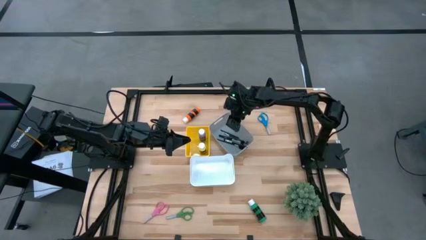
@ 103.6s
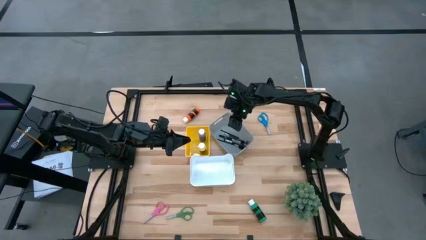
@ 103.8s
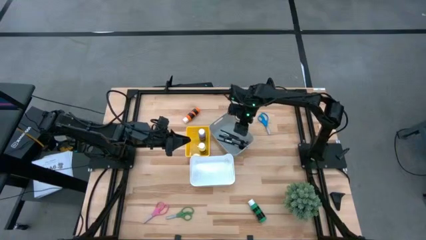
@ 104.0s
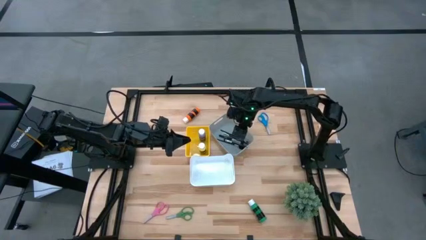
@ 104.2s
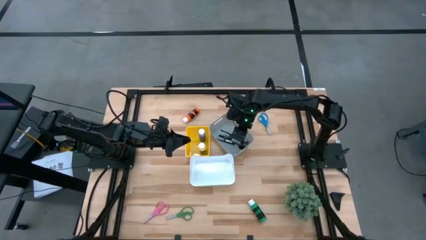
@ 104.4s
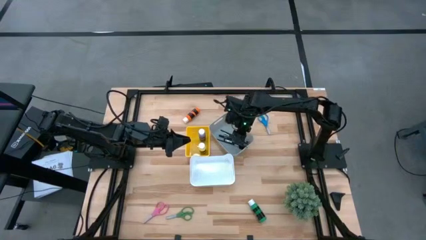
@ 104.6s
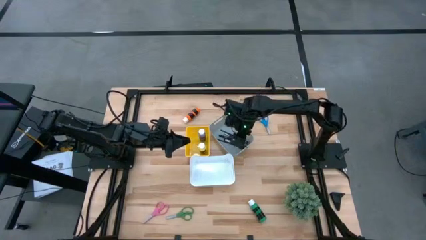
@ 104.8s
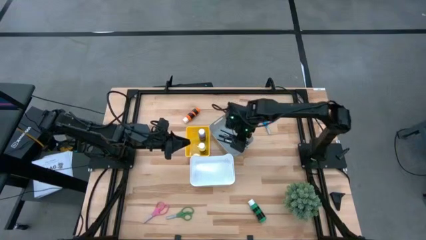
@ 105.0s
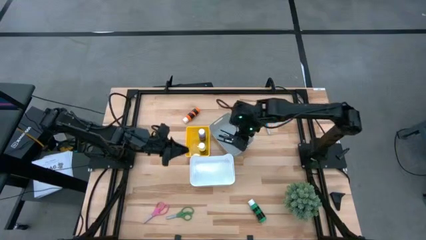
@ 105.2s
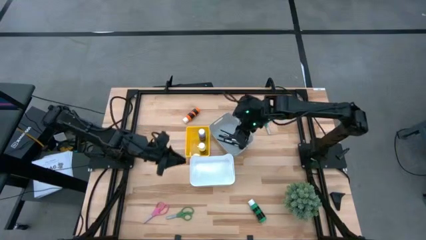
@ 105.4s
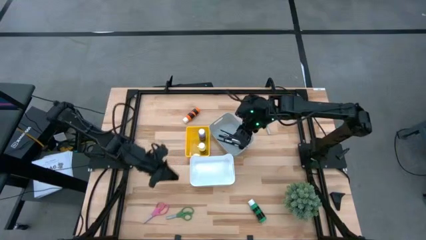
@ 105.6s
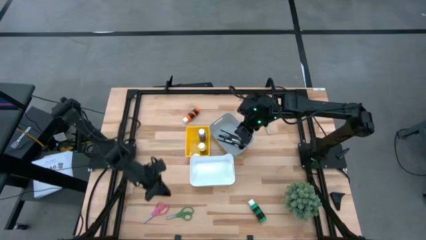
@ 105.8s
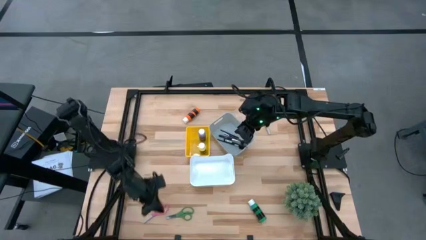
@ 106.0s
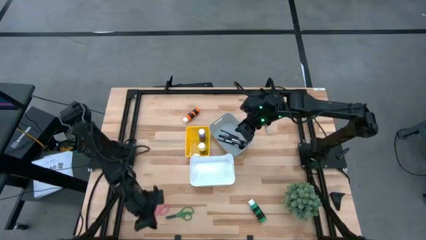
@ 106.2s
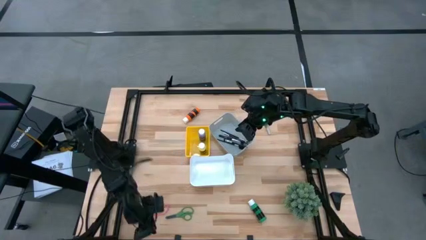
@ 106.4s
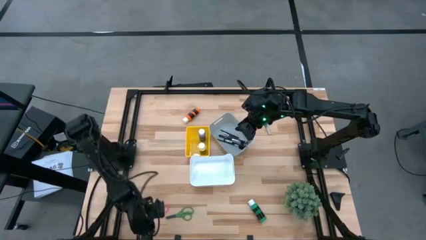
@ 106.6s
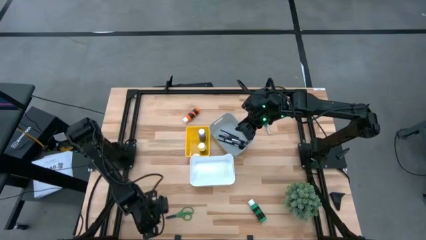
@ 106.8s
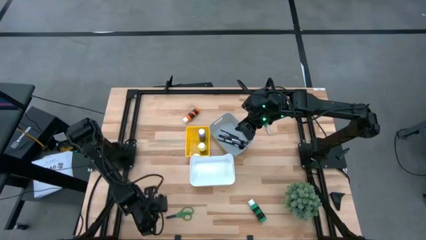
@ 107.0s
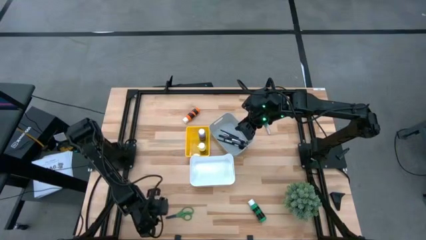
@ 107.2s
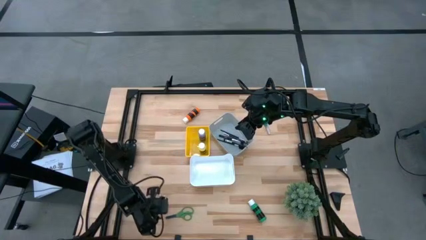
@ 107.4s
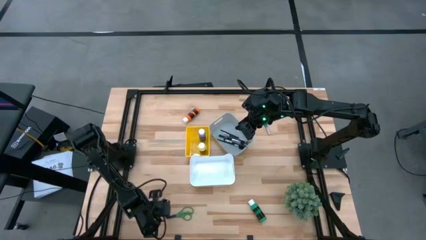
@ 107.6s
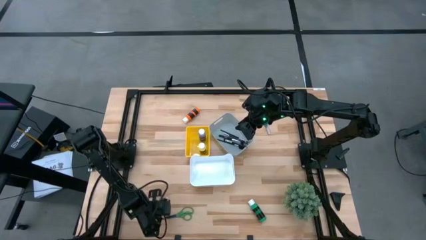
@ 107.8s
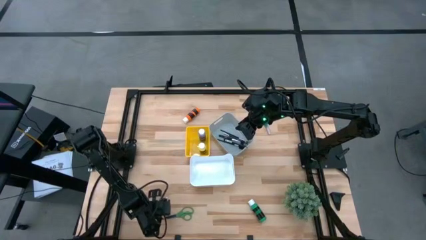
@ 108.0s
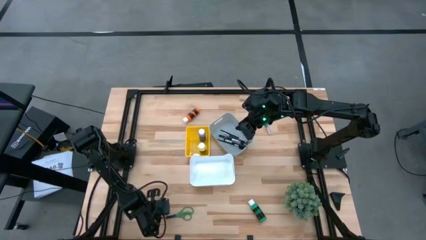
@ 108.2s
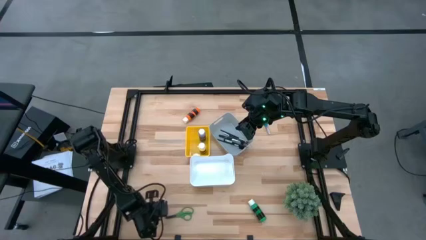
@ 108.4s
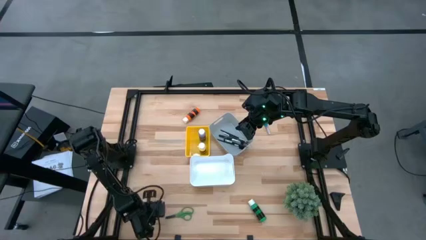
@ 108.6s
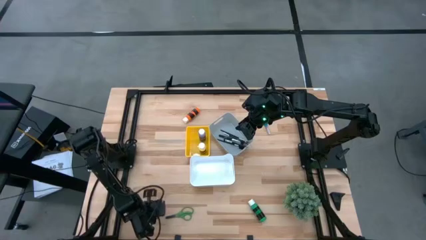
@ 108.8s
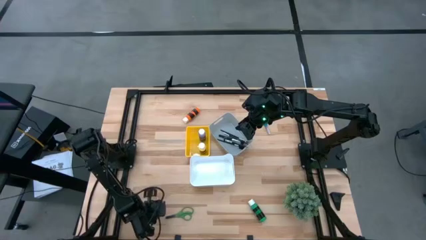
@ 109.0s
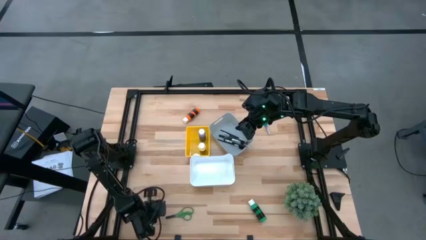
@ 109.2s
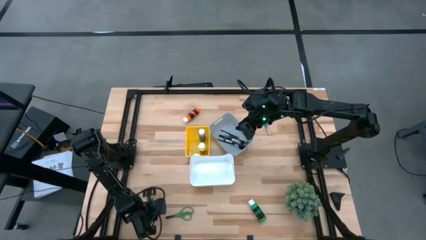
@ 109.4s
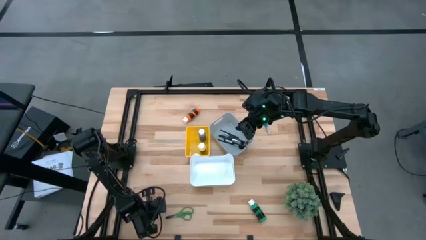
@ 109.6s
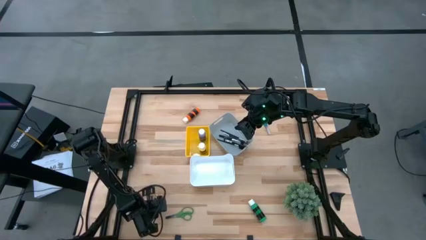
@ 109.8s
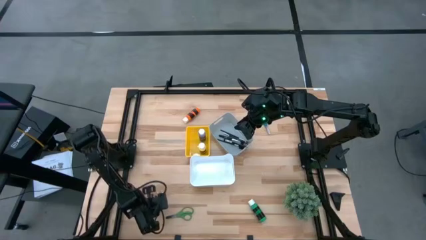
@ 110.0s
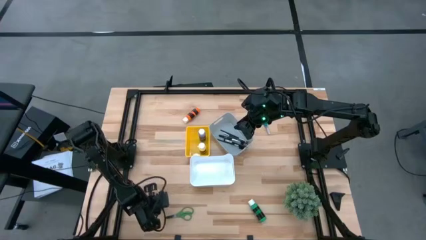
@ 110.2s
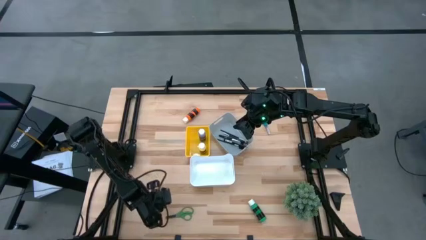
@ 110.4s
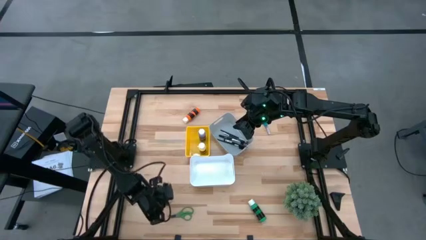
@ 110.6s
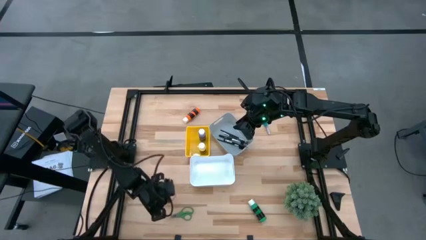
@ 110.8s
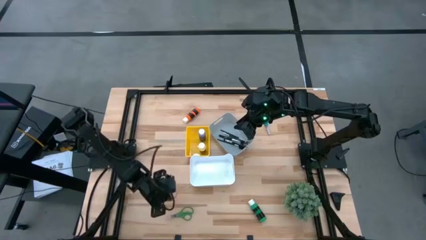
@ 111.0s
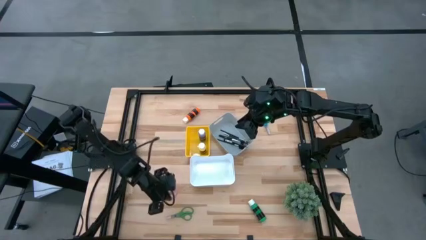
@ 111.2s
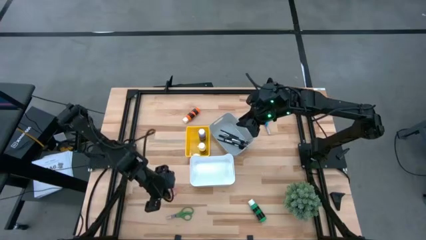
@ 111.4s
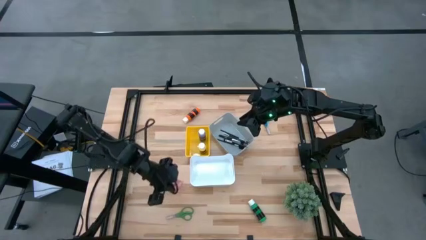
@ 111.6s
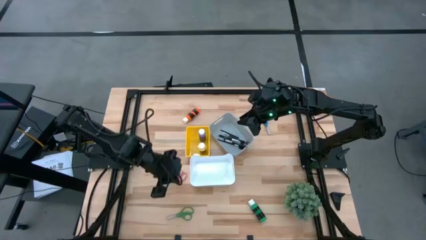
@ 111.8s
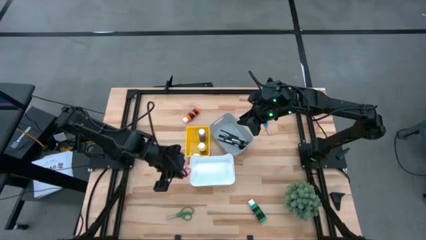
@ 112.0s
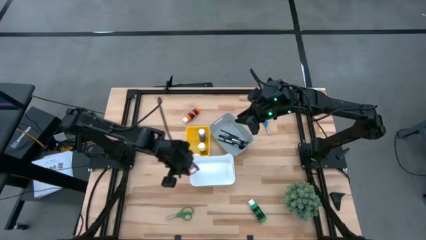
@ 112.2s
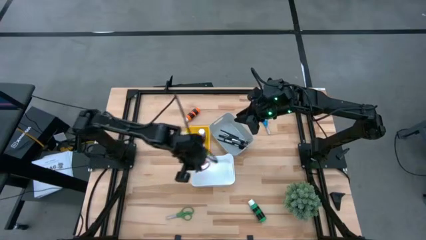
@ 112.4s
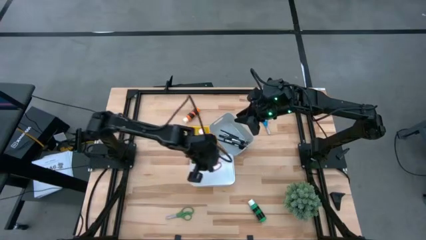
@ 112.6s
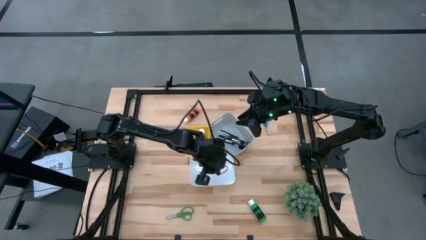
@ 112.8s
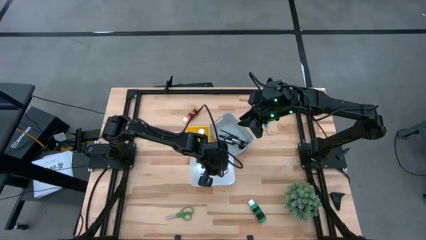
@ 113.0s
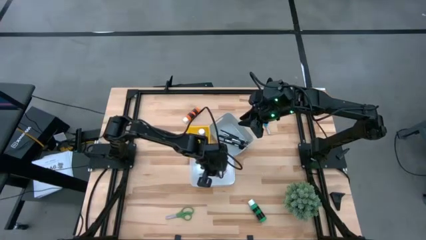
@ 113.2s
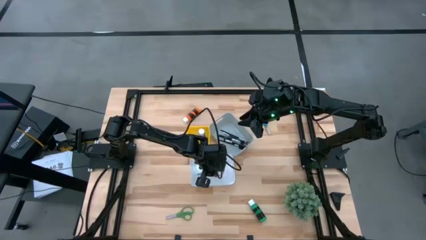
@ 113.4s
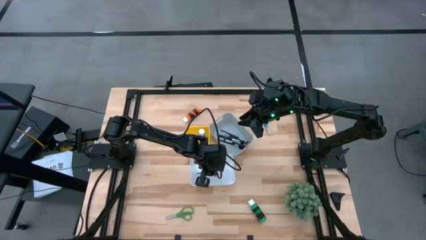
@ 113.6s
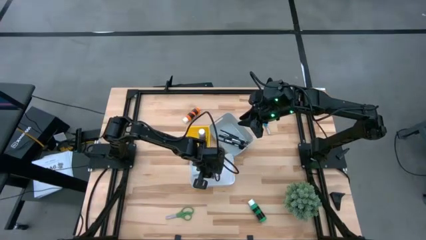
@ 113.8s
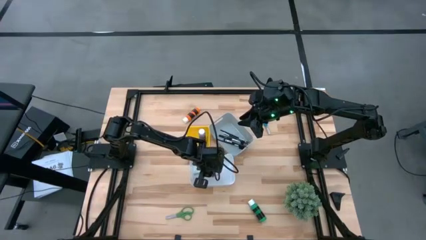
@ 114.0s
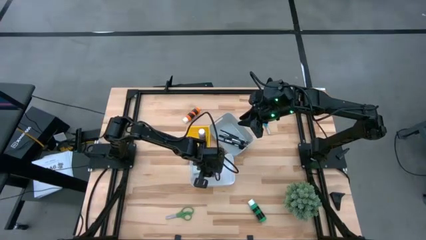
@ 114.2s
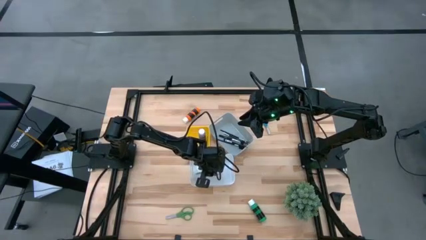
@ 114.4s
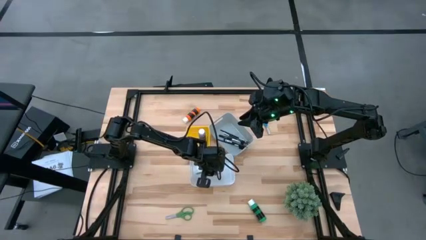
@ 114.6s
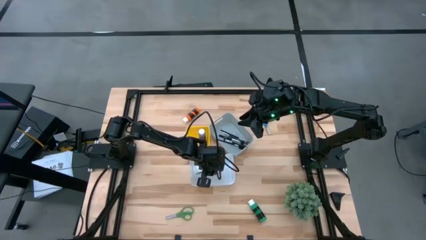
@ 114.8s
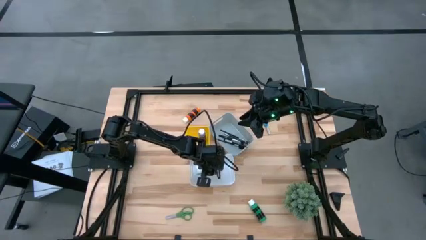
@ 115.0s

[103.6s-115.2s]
Task: Pick & Place Paint Supplies
Put the pink scissors into the white bin

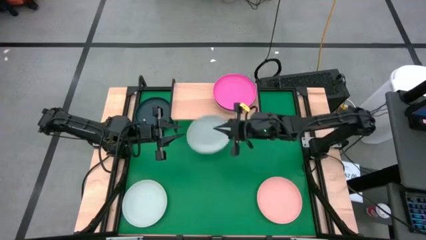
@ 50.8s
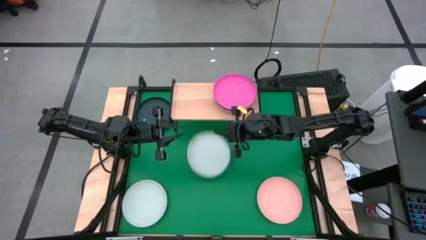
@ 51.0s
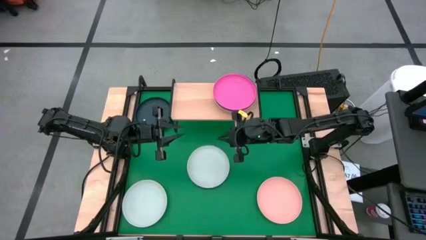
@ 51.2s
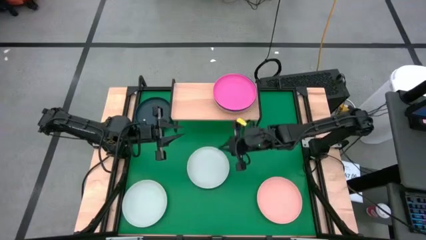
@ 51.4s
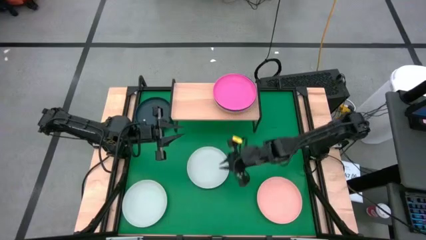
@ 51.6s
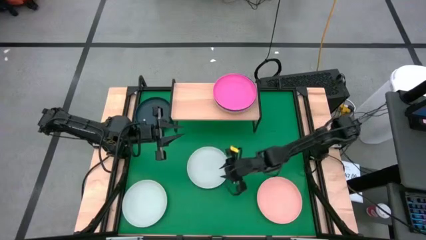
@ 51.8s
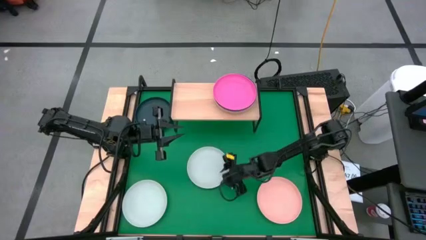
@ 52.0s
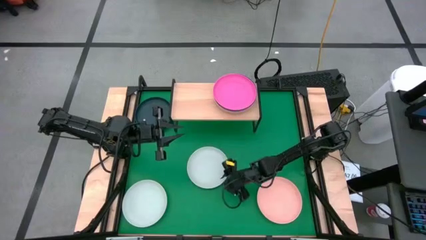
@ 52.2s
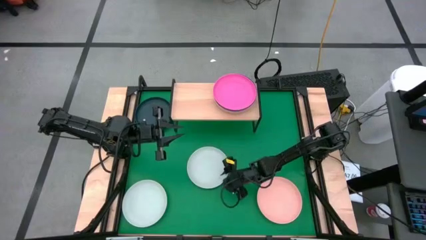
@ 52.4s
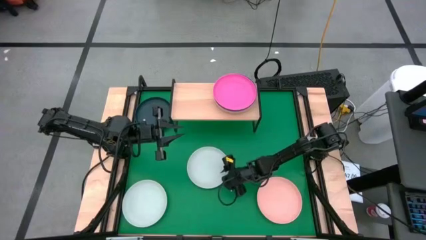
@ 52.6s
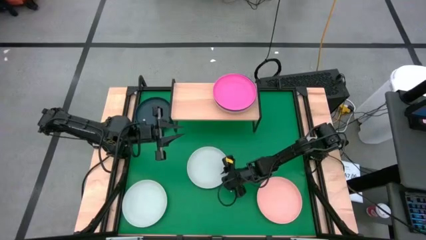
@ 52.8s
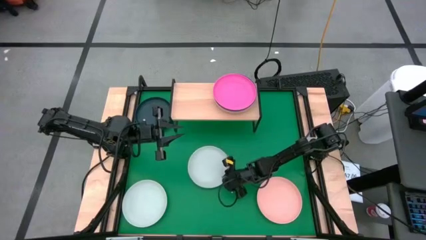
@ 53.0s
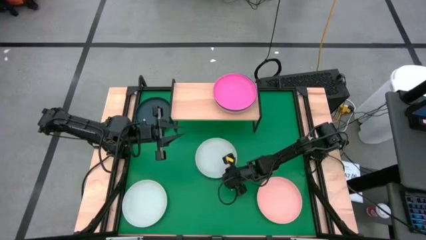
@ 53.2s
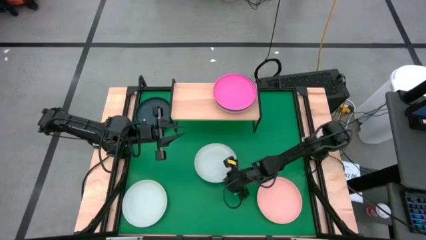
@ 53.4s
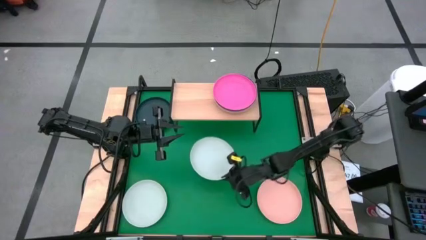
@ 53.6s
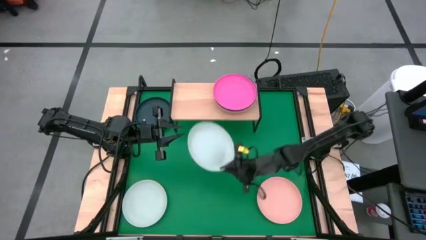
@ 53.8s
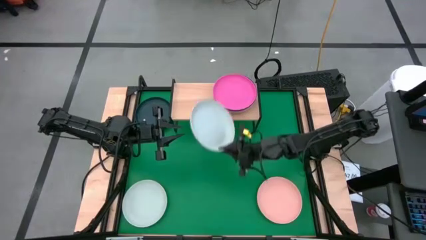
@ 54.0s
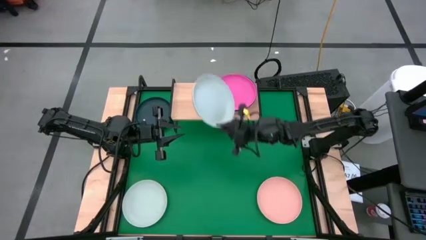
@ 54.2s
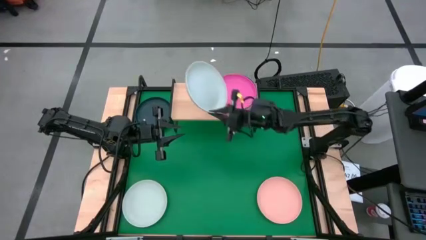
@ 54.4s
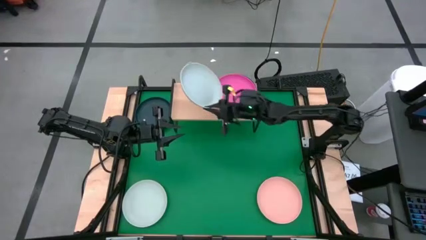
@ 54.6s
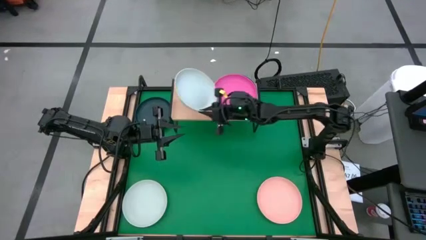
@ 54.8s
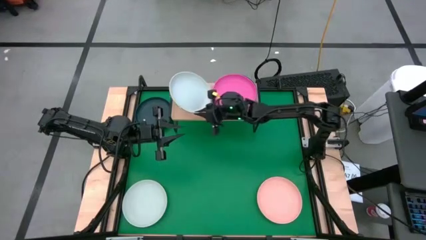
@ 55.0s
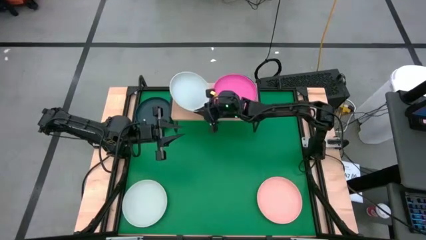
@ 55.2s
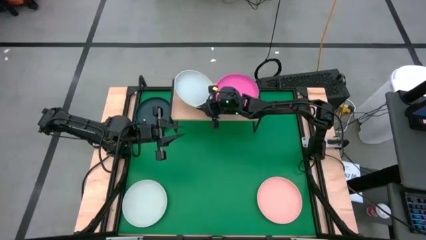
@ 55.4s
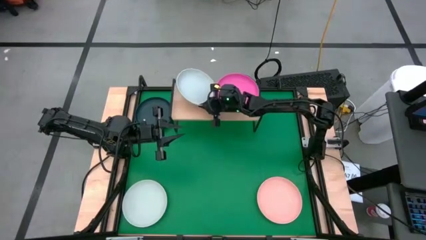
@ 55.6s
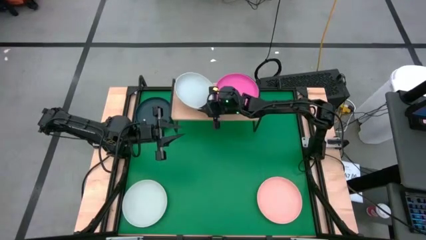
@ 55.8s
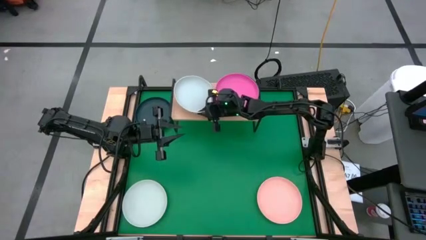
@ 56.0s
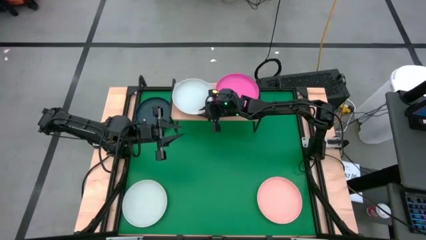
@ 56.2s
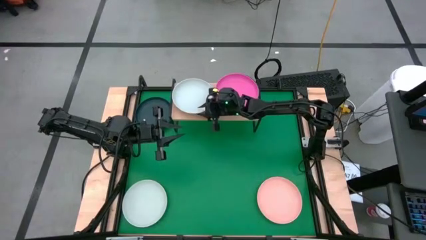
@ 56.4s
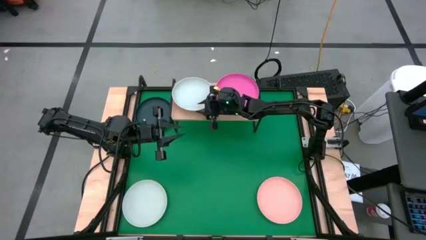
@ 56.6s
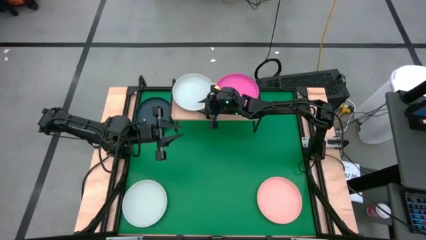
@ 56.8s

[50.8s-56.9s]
Task: Place and stack plates onto a shelf
Put the right white plate on the shelf
